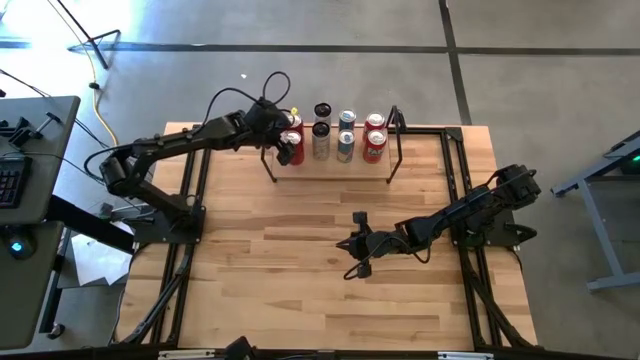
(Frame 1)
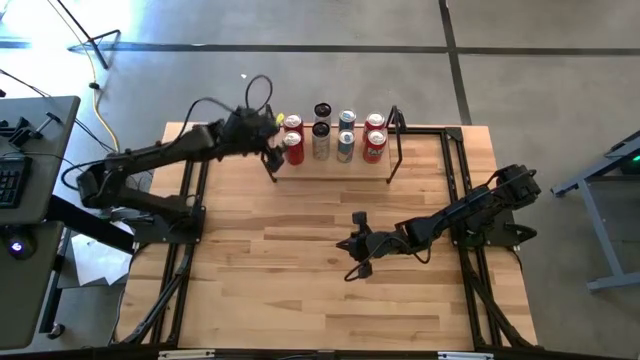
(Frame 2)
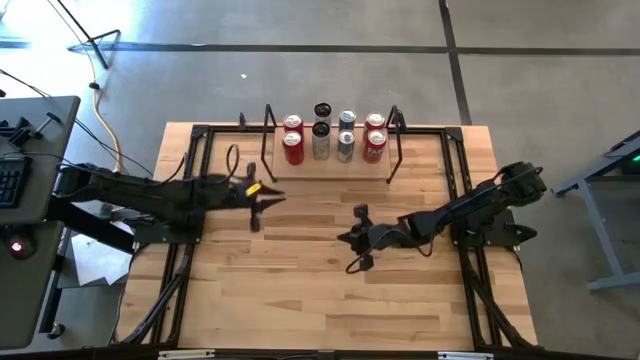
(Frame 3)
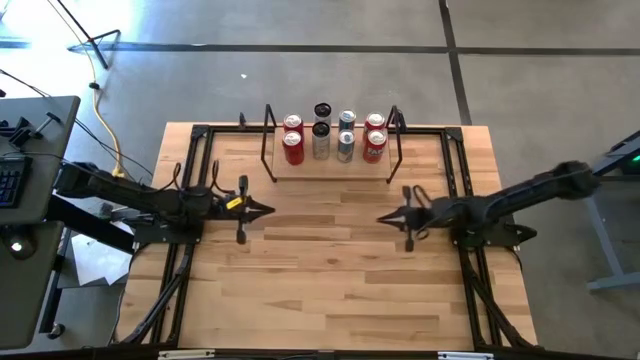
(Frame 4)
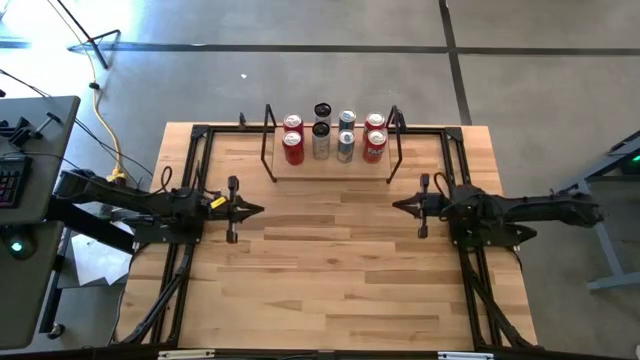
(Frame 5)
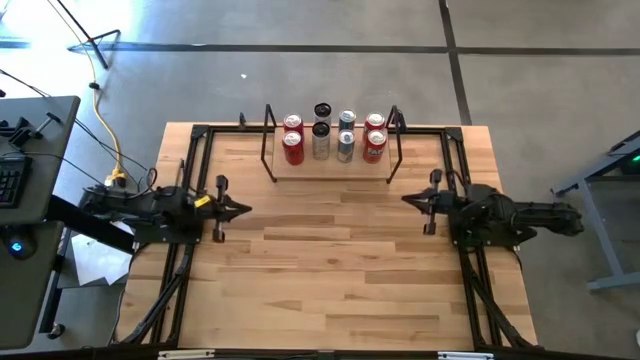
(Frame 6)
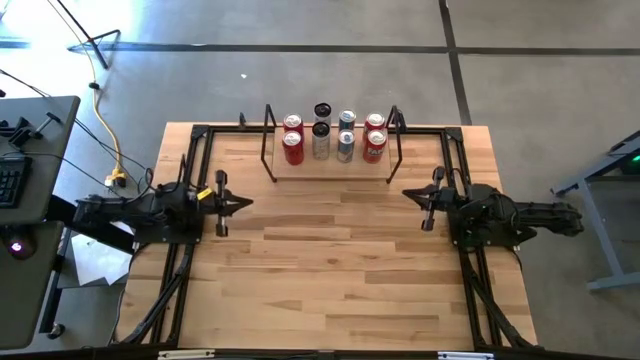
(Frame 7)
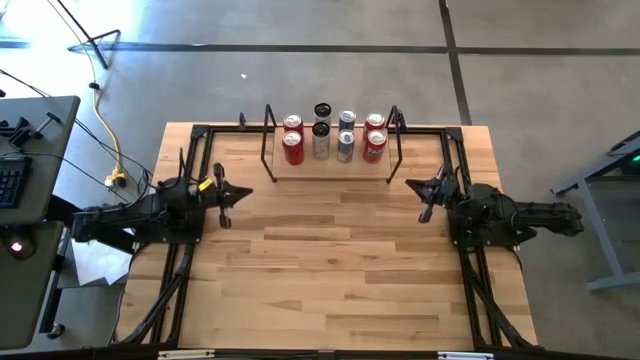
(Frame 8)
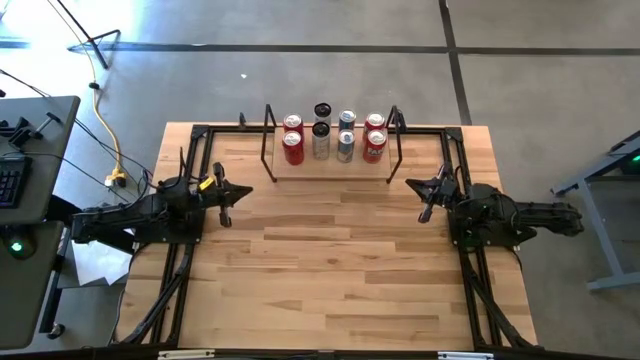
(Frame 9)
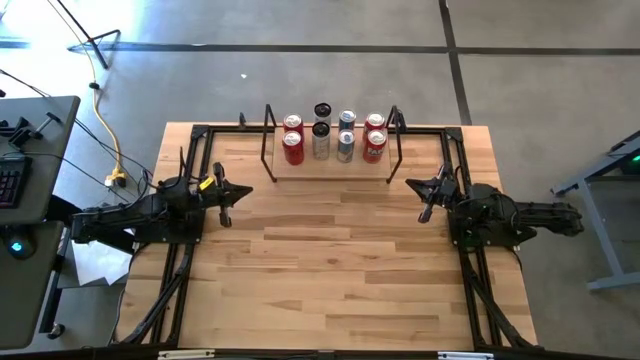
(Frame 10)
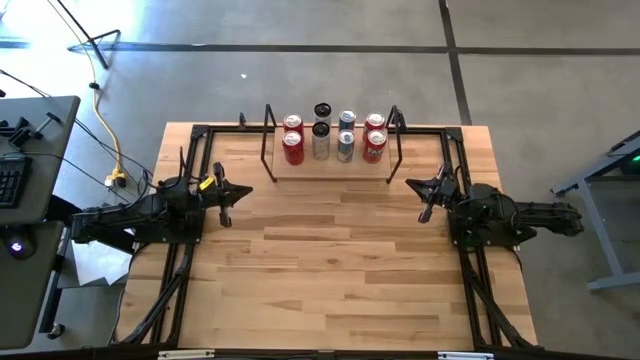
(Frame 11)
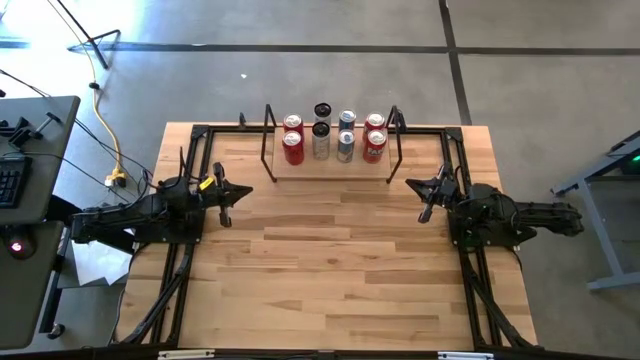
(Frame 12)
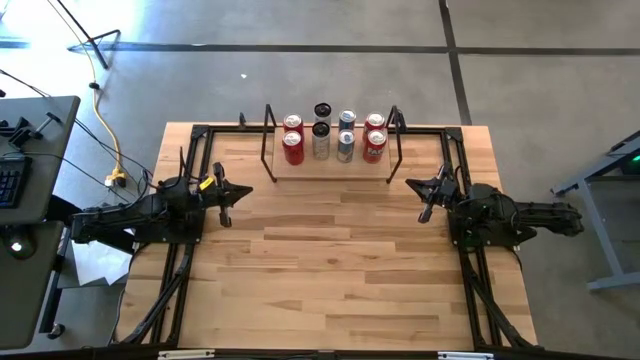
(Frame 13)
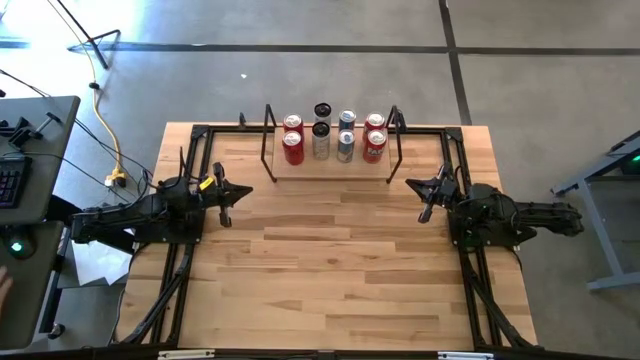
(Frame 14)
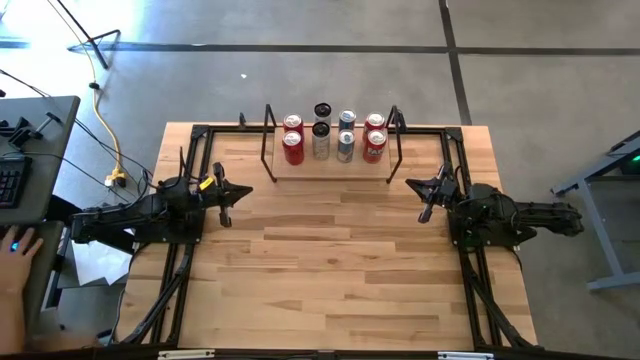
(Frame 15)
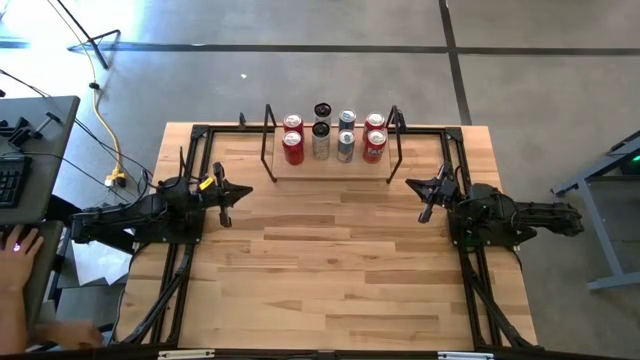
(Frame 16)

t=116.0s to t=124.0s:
Task: Place canned beverage on shelf
Return to Home Position

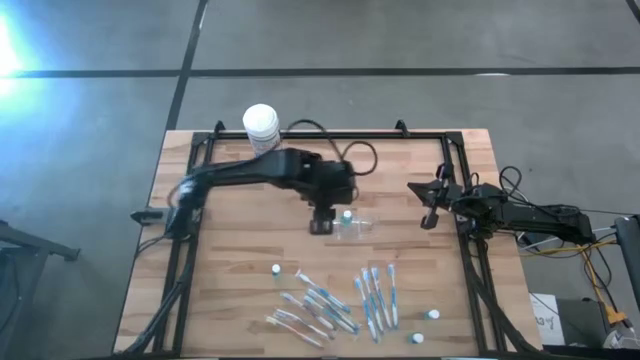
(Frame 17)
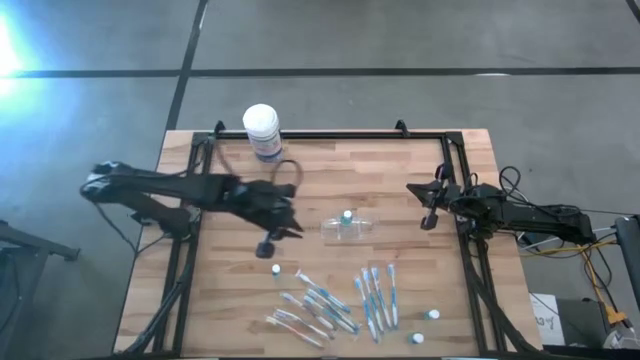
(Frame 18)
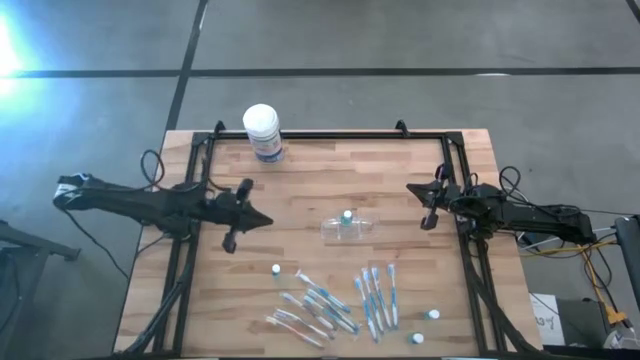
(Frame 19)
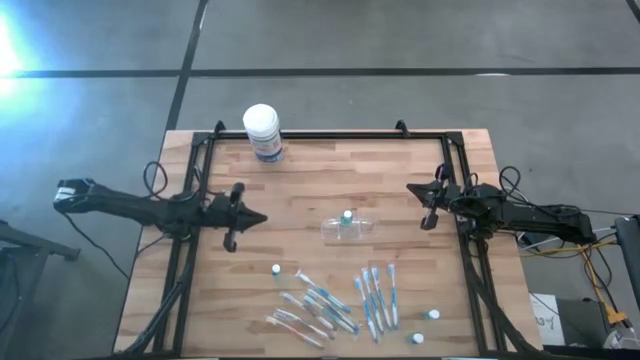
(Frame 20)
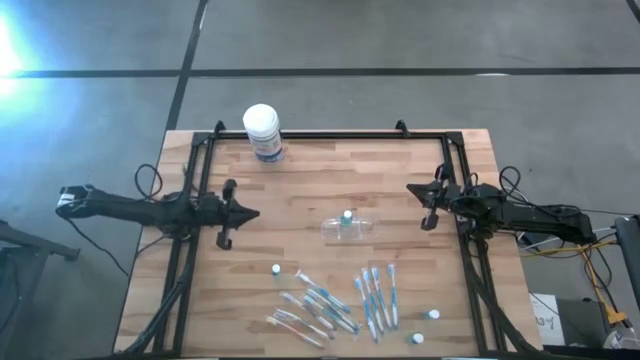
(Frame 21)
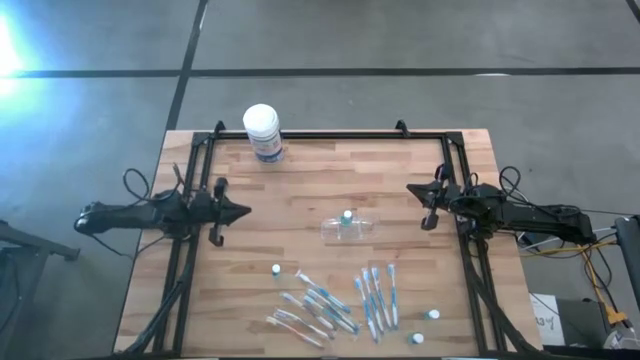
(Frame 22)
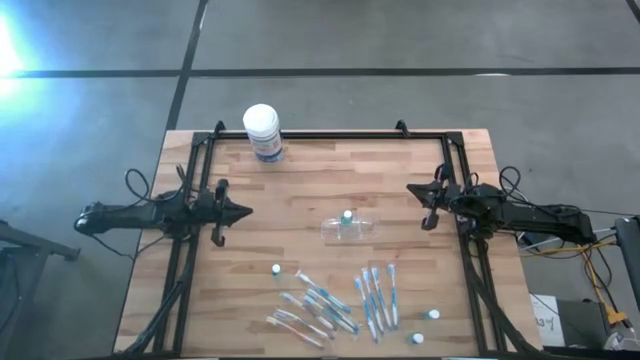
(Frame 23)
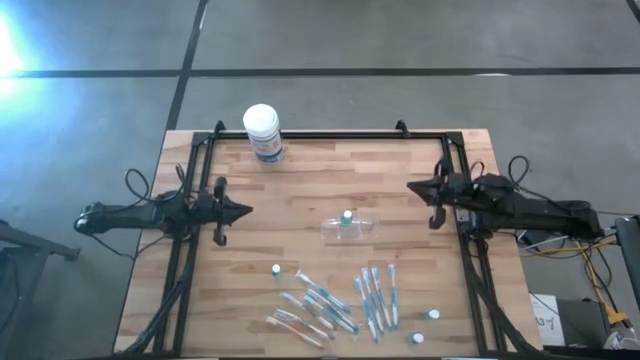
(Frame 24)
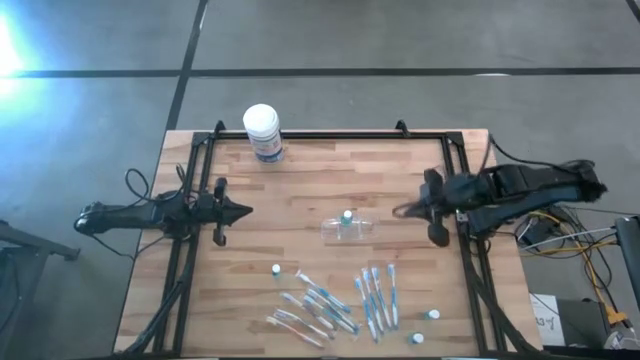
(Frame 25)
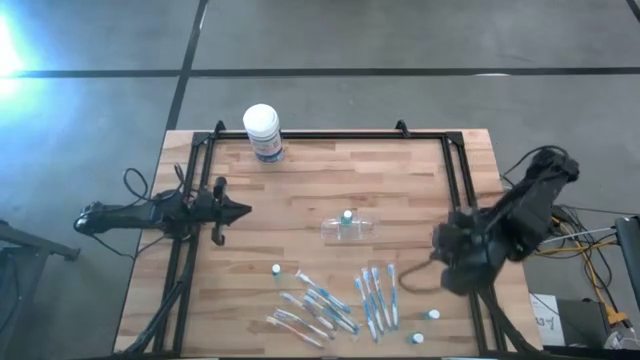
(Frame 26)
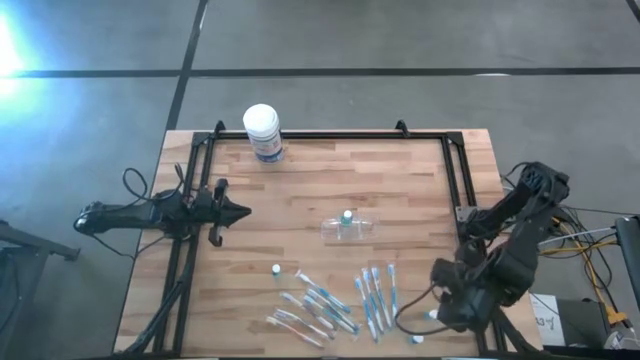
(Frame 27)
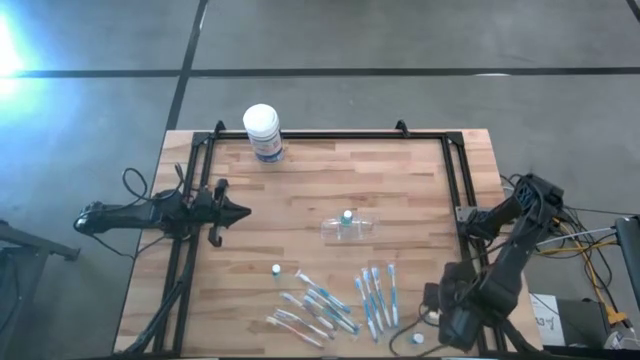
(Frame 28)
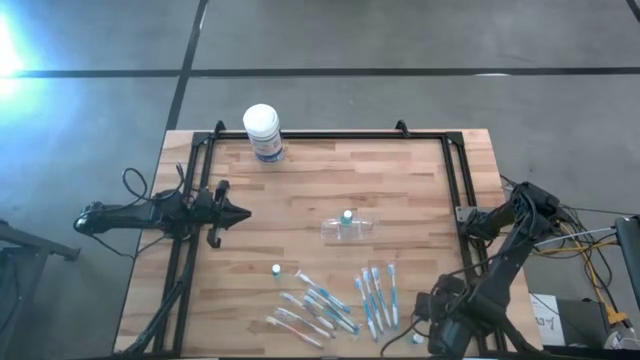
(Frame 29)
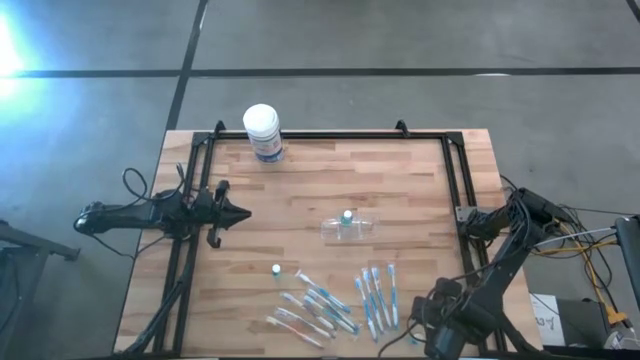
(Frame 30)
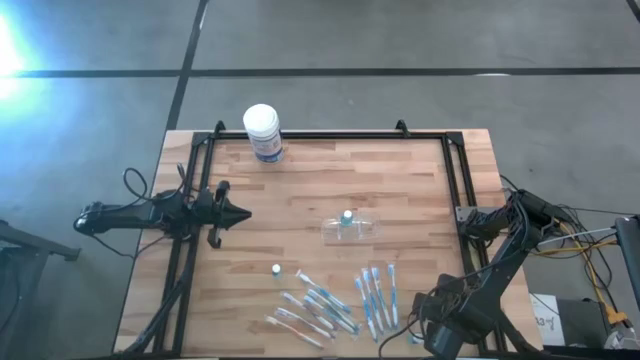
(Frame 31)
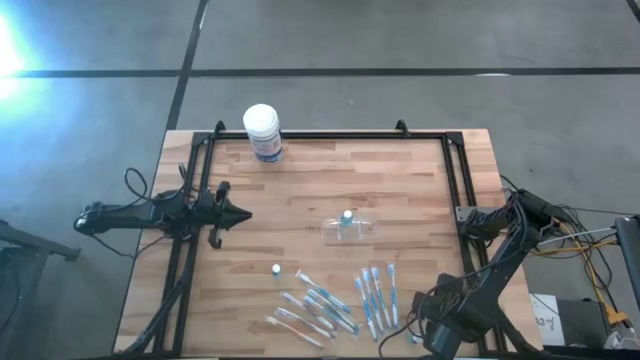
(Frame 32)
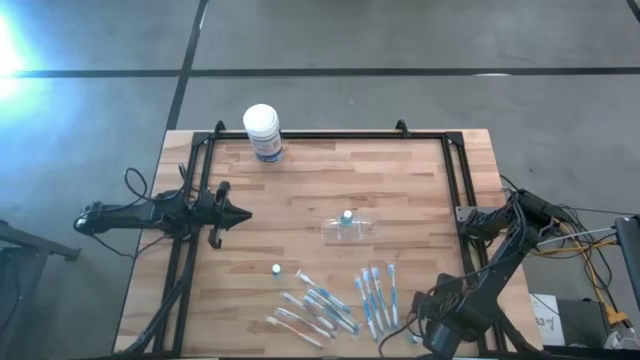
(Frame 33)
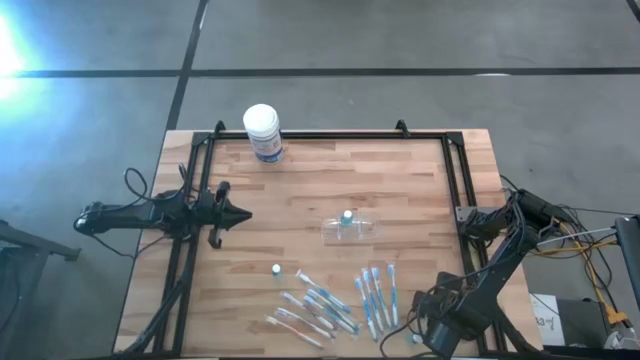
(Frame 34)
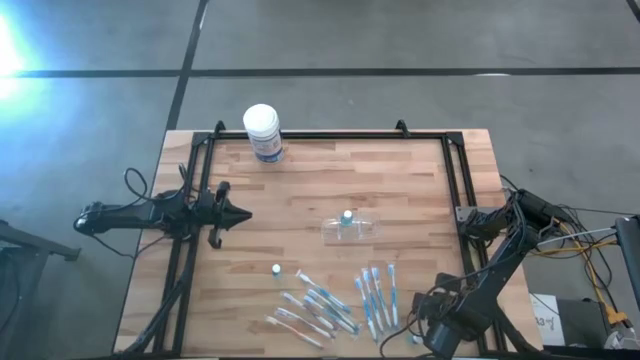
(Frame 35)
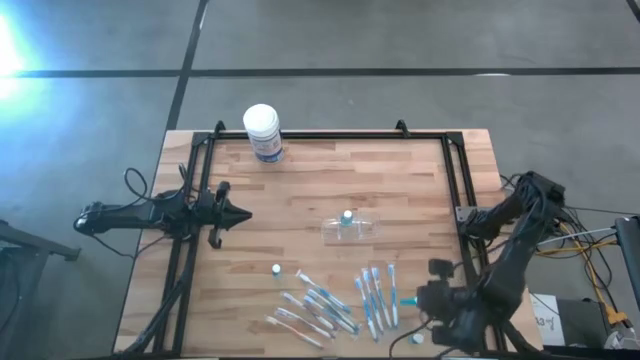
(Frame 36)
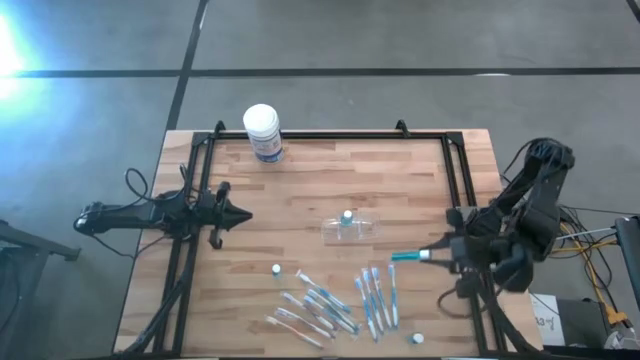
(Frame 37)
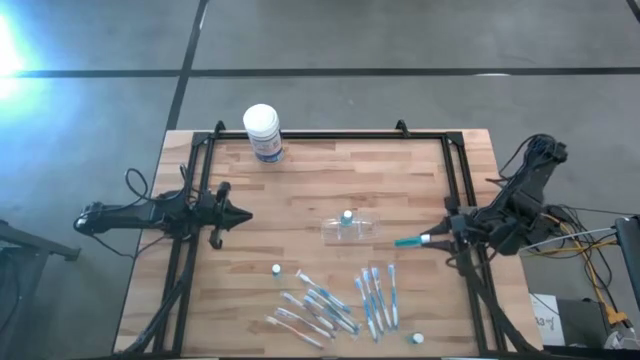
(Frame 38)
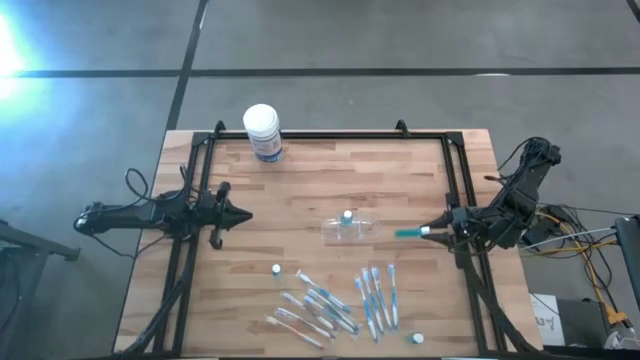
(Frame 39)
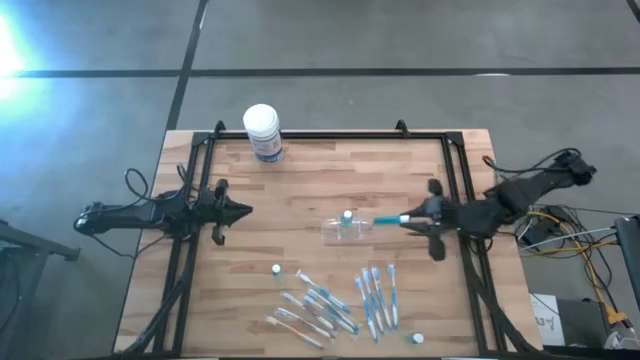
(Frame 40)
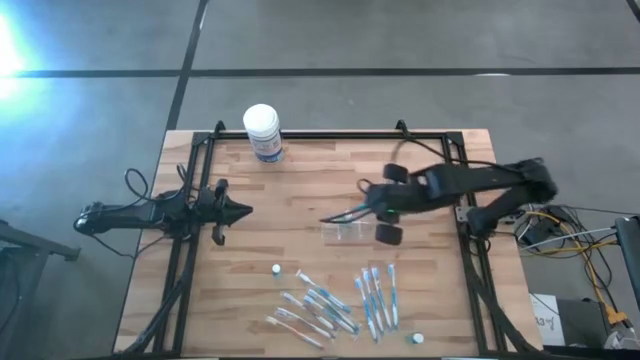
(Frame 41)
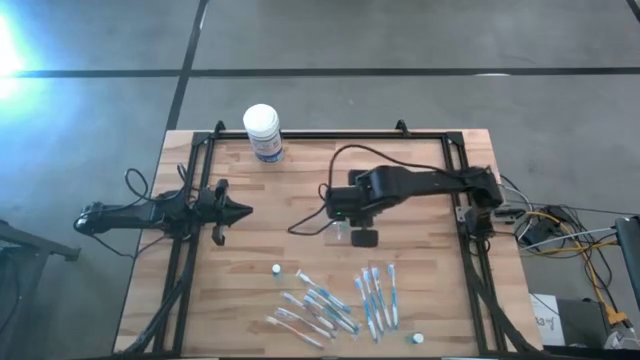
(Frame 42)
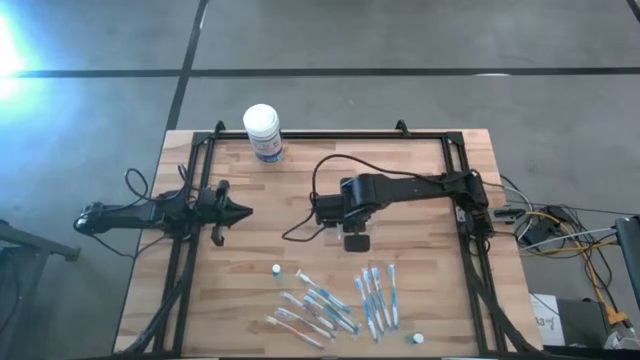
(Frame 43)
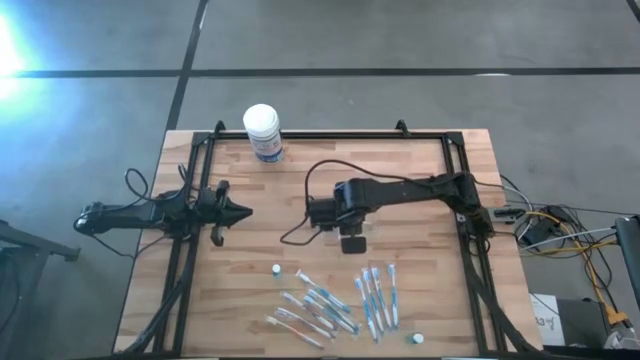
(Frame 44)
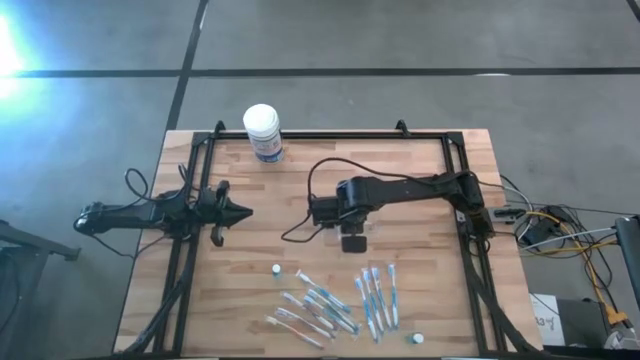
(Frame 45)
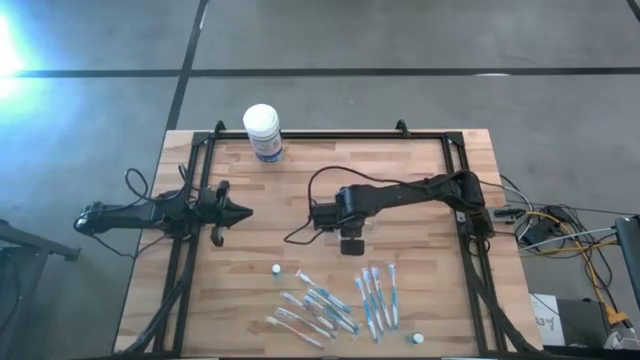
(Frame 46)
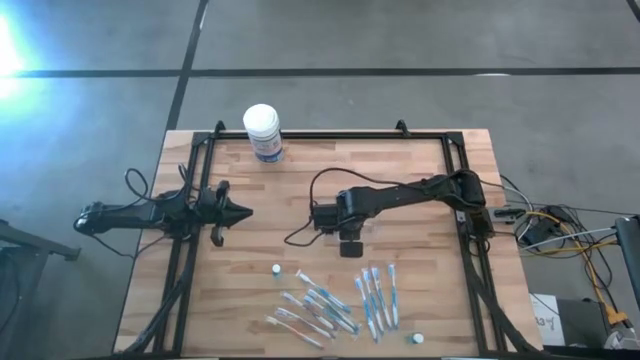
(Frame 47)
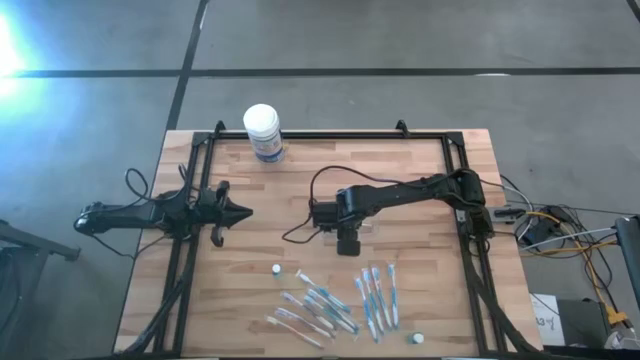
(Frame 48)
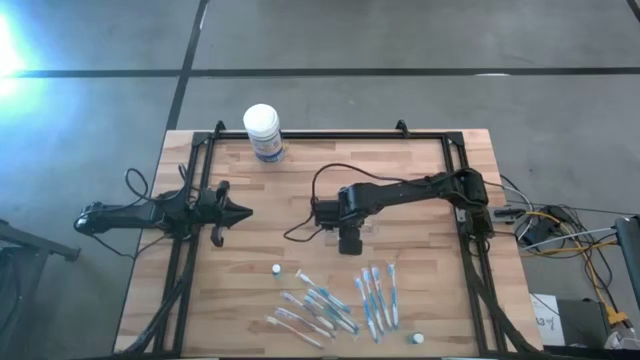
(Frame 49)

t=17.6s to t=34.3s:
Task: Pick & Place toothbrushing station
Put the blue mouthwash into the transparent organizer
